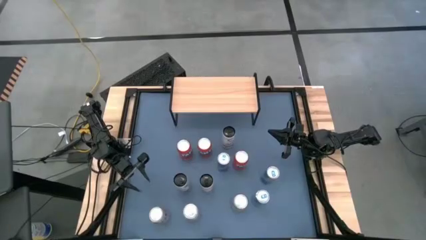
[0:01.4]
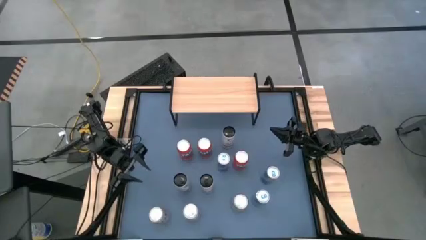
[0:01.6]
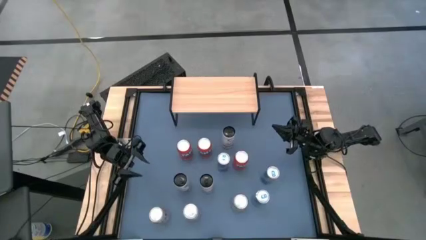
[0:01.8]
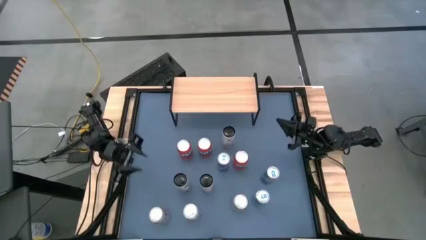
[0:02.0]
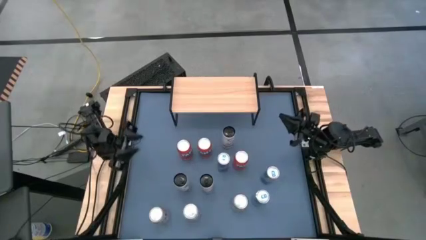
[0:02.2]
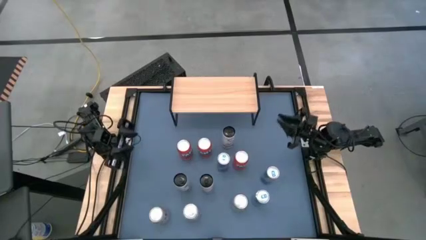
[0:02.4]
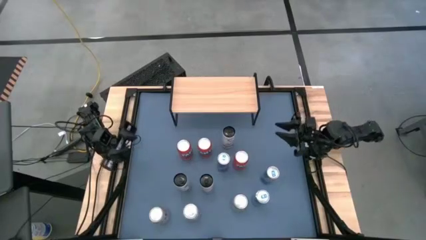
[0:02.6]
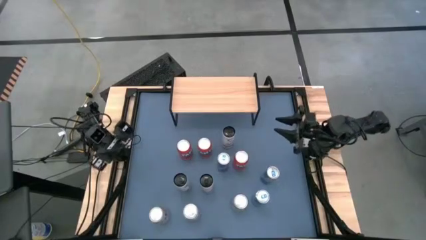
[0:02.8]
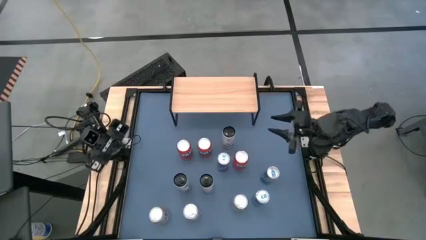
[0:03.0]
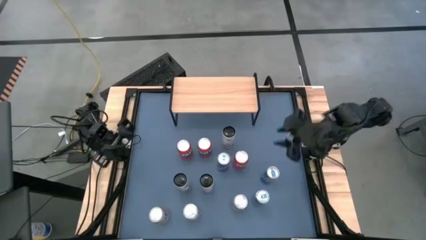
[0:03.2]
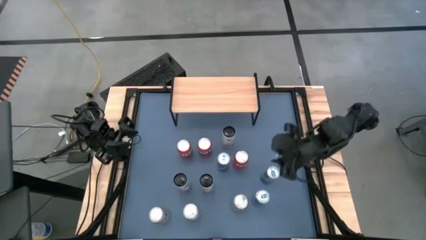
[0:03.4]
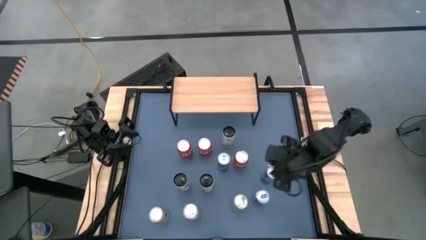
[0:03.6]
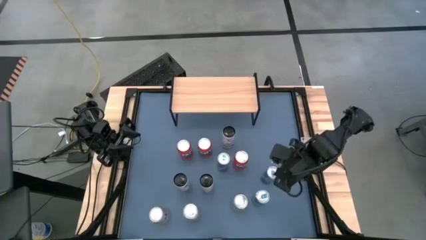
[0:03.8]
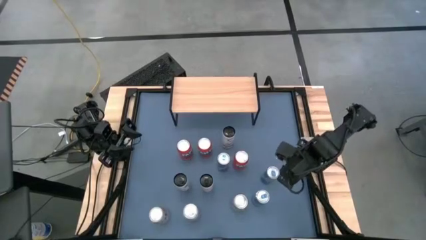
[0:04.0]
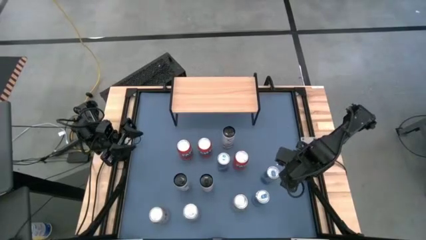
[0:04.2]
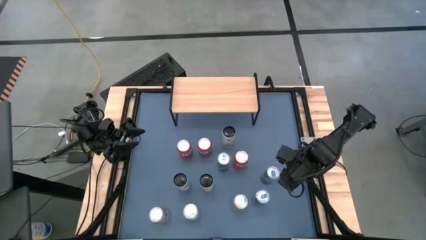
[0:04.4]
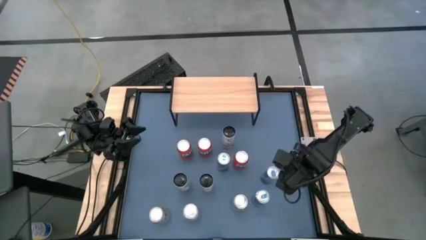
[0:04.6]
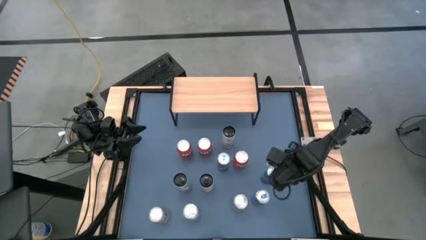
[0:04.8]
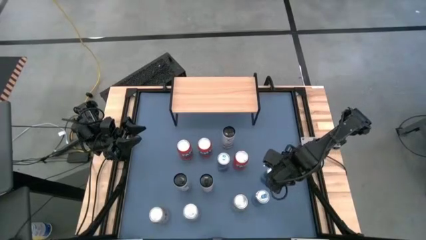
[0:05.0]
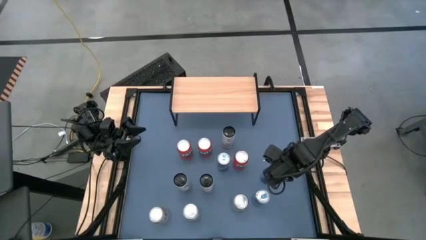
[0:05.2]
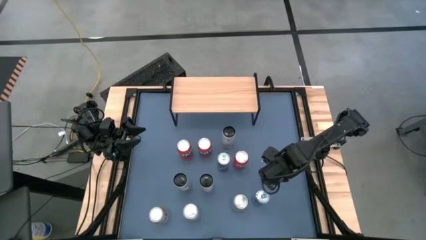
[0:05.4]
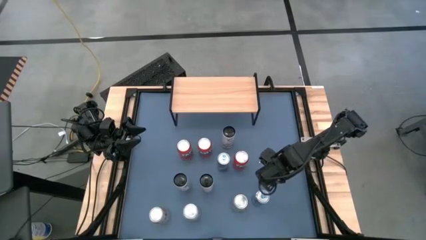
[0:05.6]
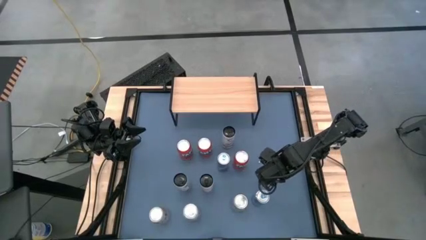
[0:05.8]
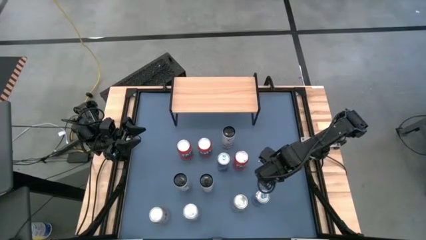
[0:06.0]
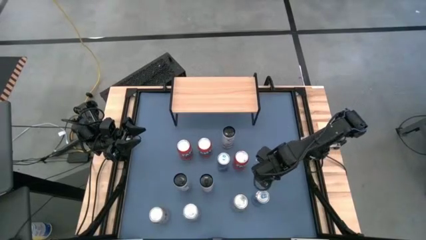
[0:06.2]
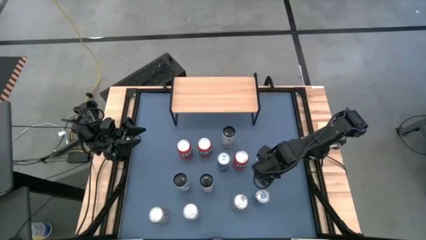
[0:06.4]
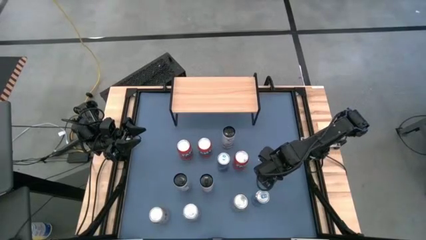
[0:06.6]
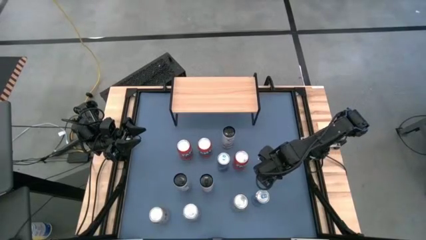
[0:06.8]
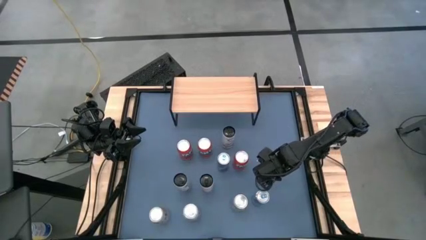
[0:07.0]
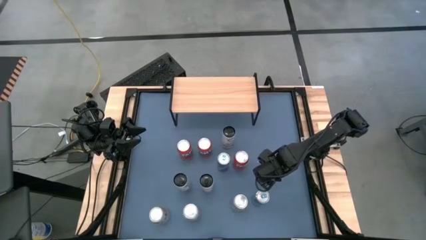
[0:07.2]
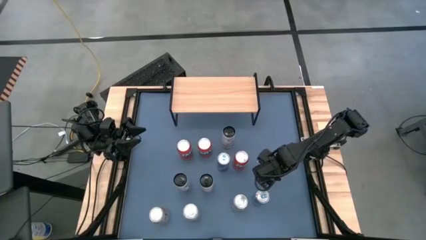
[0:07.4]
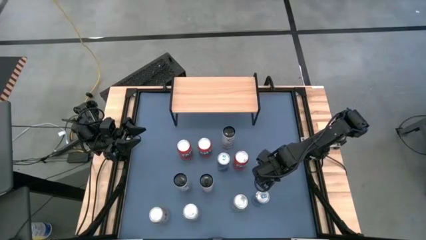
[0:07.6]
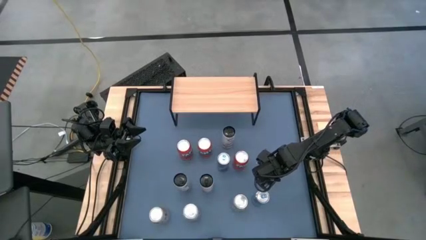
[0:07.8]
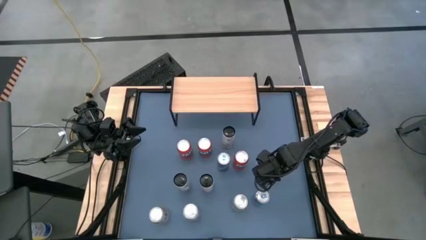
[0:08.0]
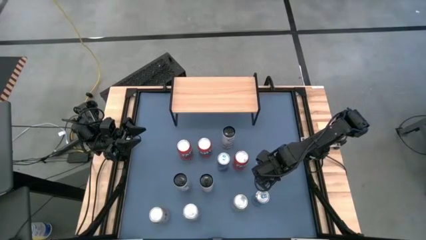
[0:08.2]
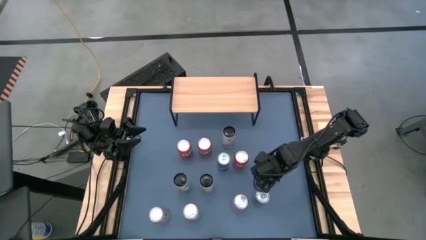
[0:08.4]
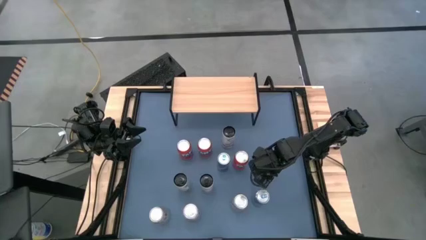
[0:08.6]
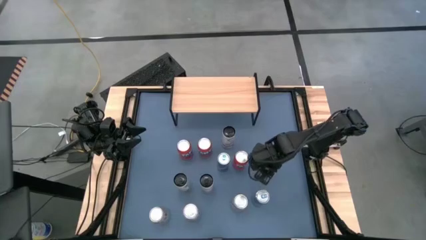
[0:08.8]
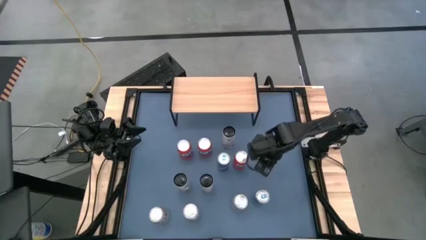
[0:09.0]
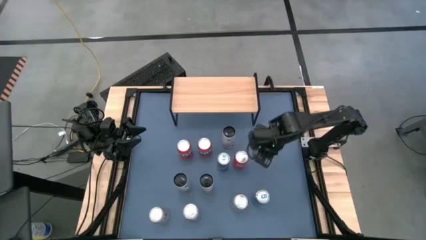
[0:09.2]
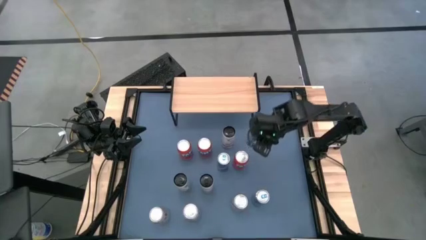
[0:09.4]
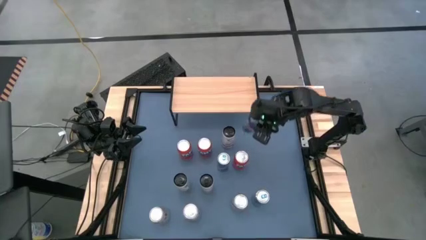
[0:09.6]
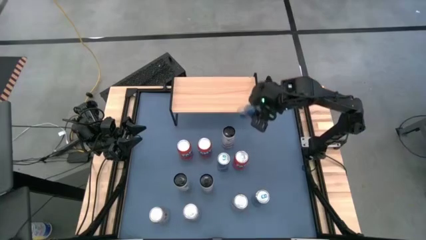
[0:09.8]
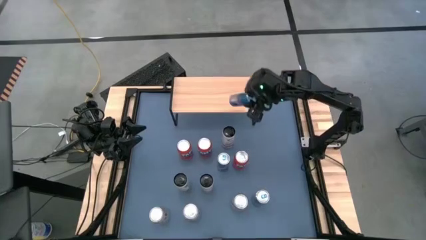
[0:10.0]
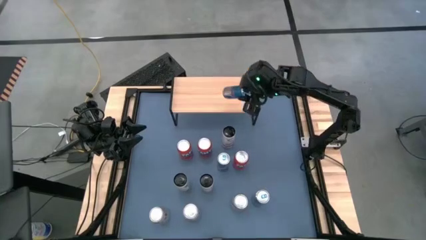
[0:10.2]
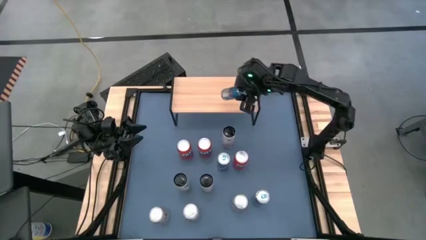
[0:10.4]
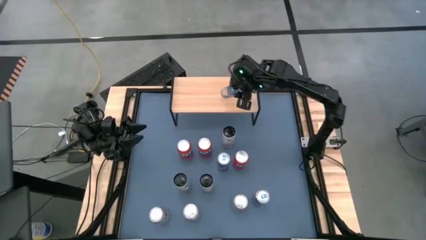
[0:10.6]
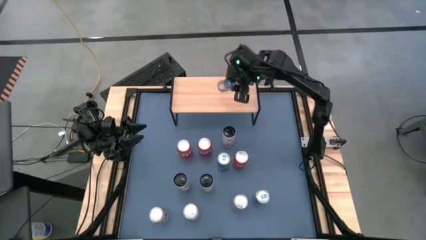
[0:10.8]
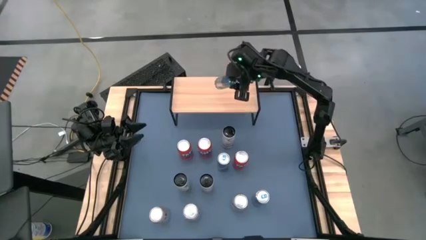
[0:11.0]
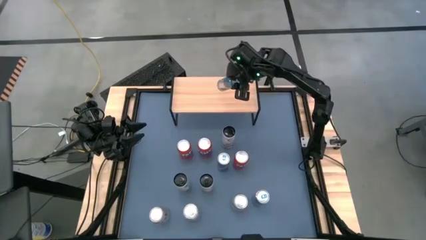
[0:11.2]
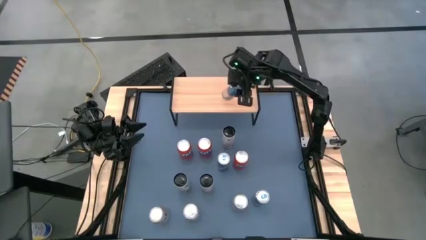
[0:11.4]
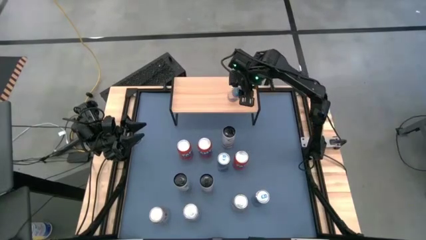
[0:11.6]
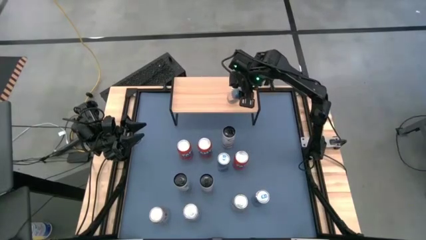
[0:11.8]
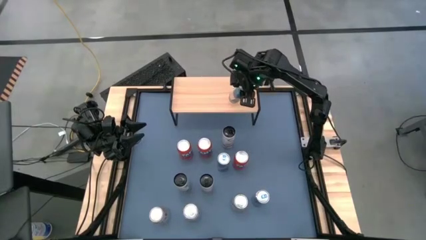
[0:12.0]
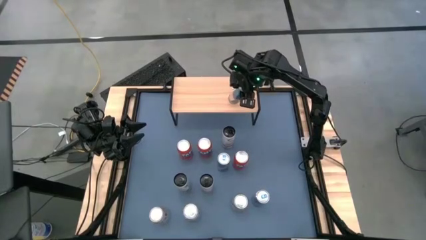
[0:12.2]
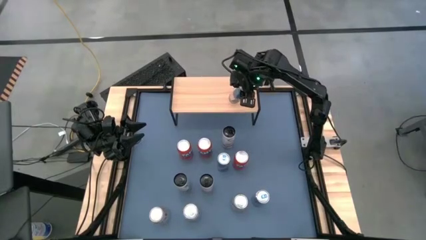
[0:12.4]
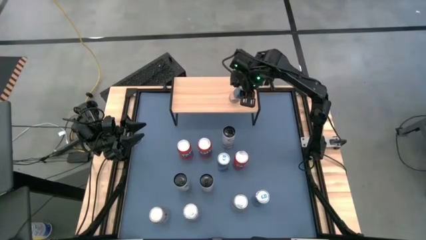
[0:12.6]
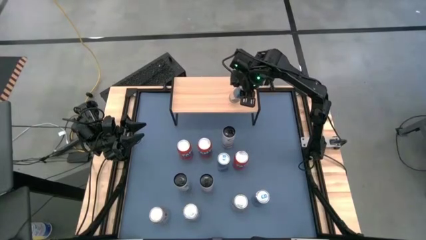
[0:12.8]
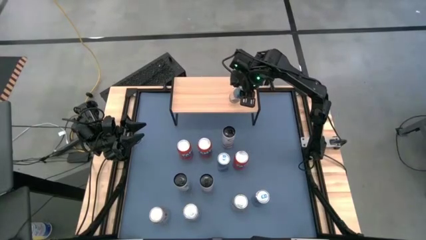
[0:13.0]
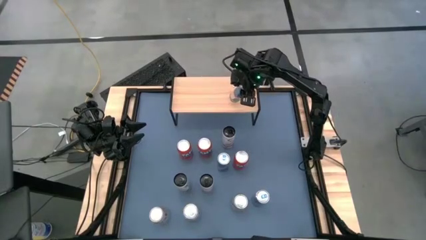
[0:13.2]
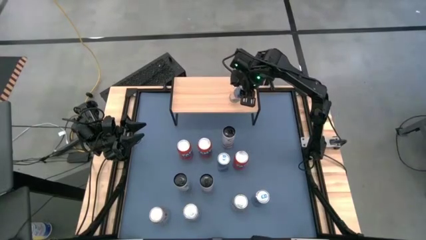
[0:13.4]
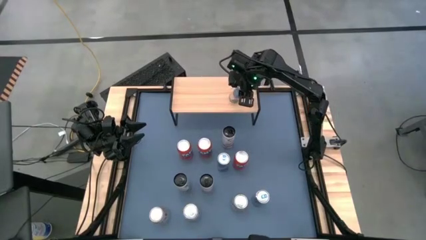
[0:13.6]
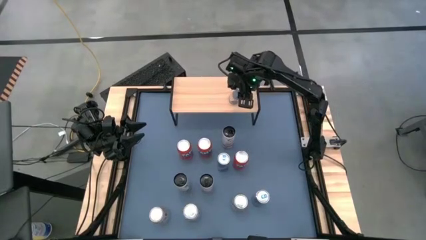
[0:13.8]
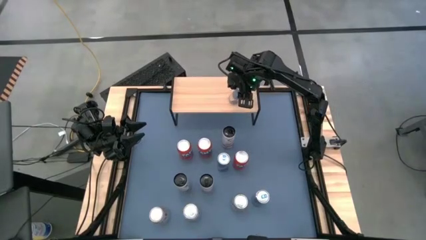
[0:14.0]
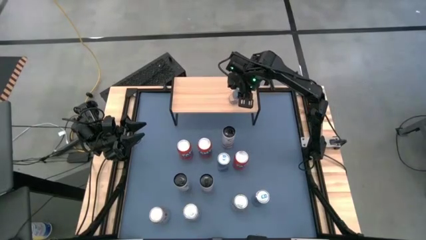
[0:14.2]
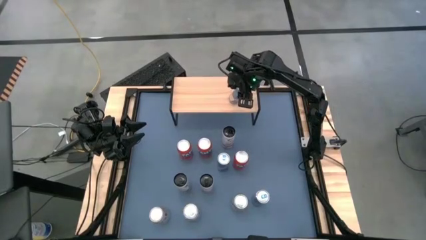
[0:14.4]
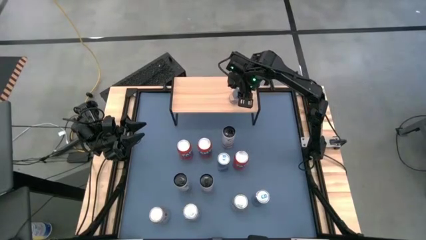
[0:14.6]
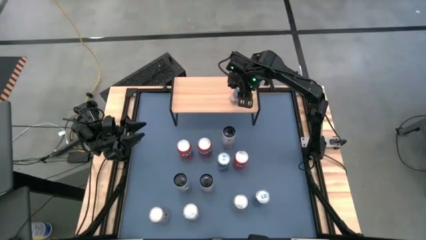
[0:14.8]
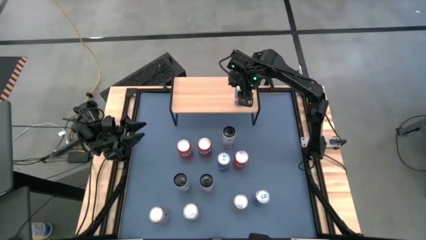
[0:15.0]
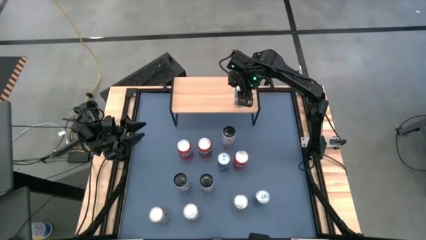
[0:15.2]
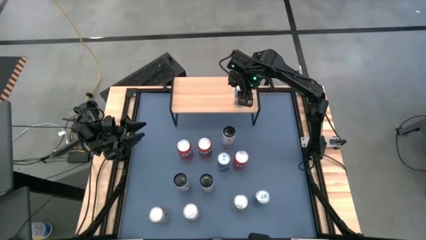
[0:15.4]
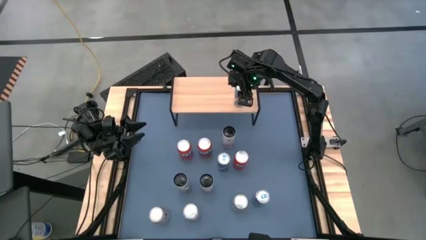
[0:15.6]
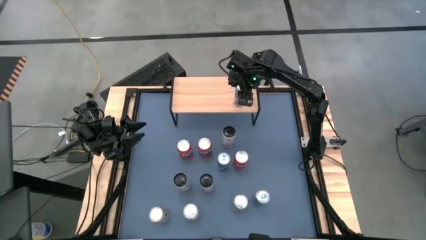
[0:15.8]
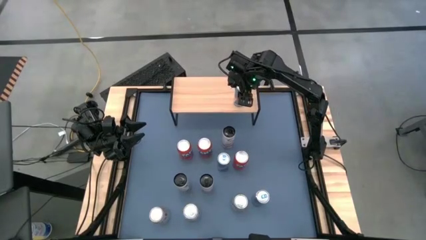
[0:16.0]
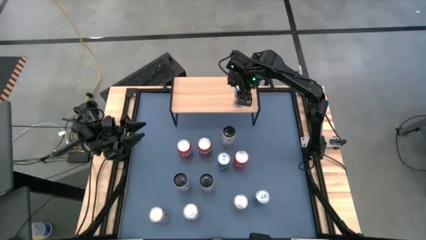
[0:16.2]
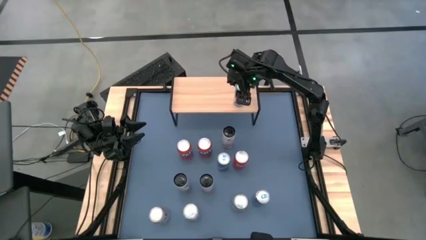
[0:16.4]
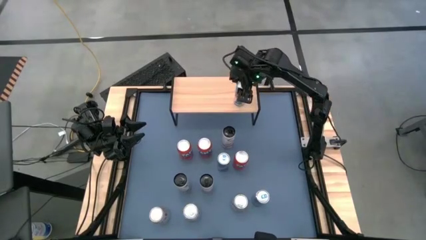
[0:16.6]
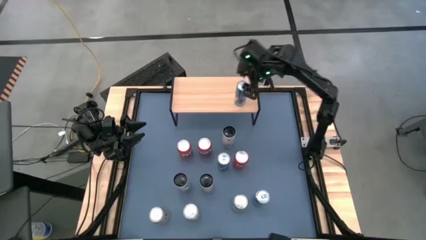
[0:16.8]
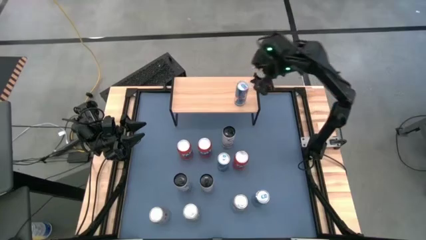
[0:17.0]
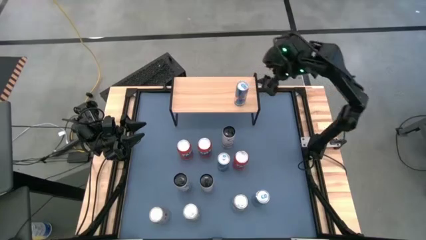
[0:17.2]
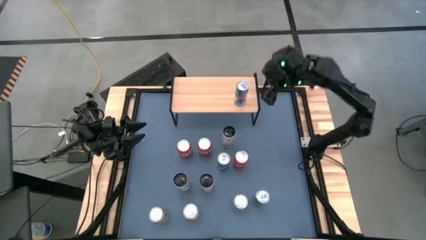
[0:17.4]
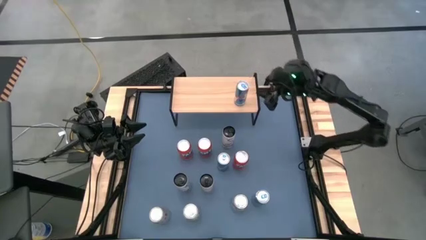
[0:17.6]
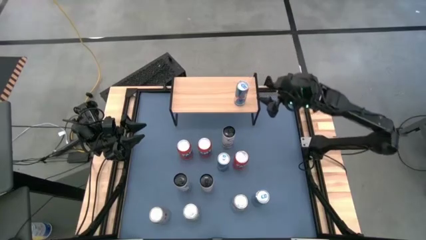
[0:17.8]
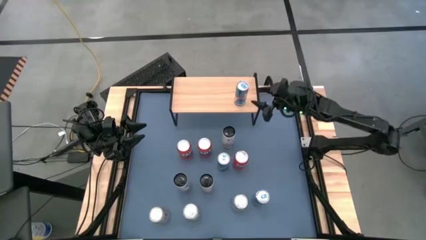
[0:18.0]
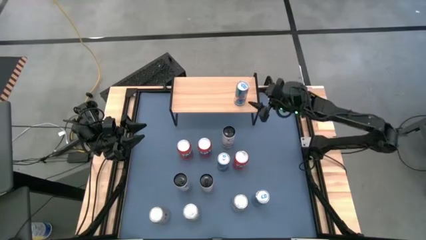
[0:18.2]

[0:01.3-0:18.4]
Task: Place canned beverage on shelf
Put the middle blue soda can on the shelf
